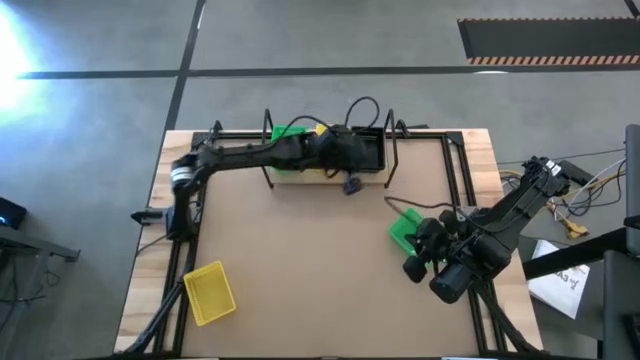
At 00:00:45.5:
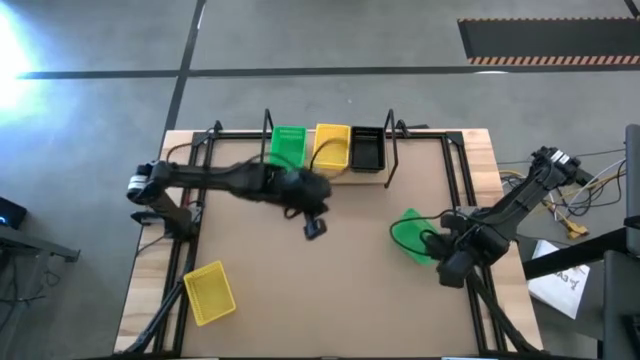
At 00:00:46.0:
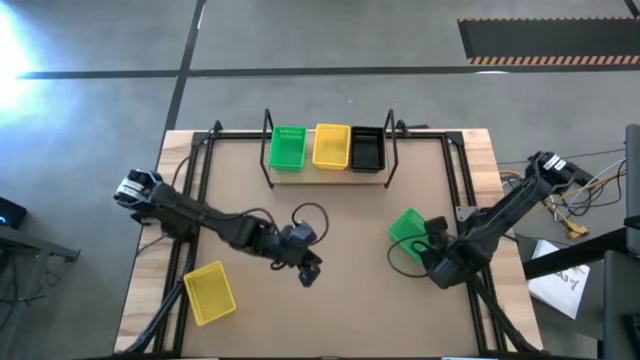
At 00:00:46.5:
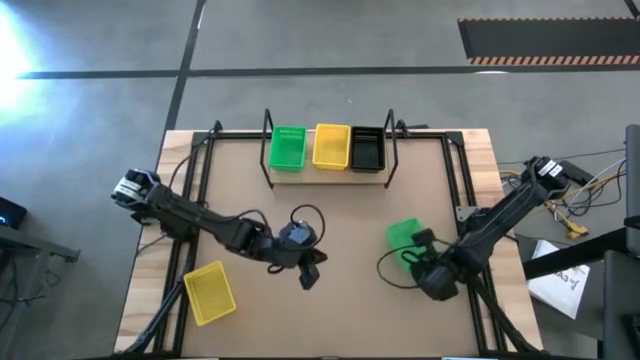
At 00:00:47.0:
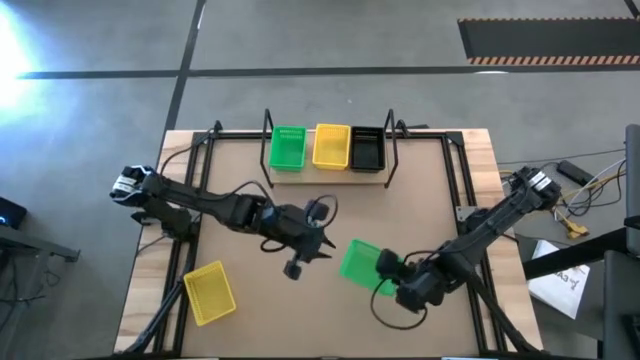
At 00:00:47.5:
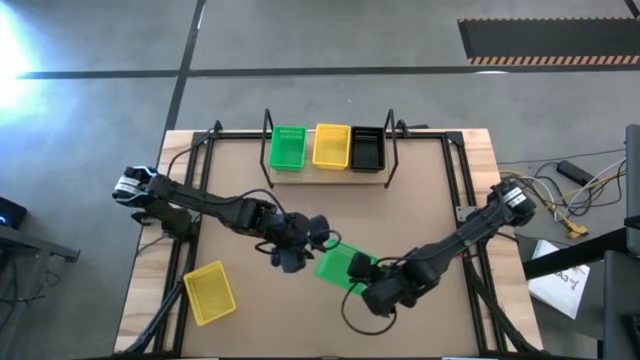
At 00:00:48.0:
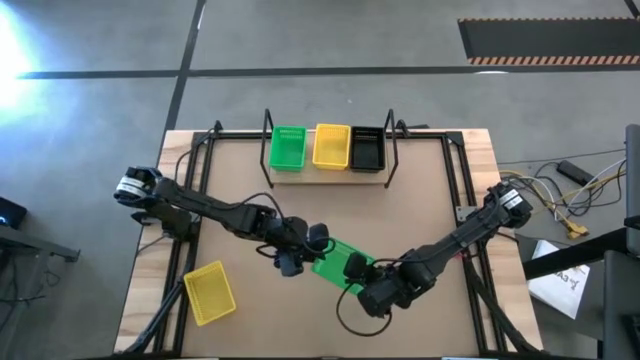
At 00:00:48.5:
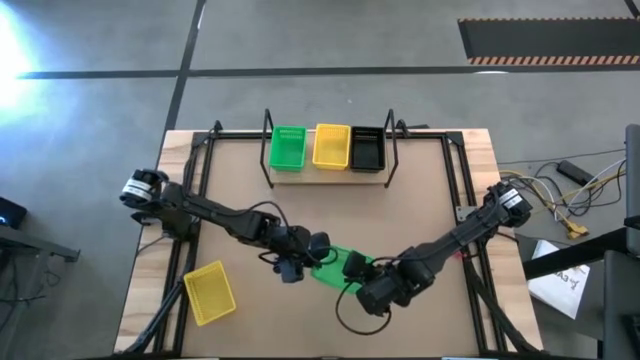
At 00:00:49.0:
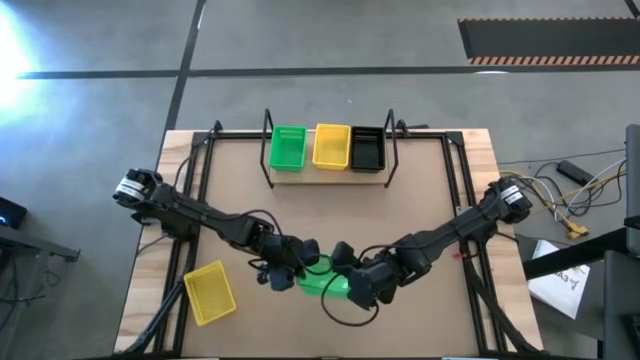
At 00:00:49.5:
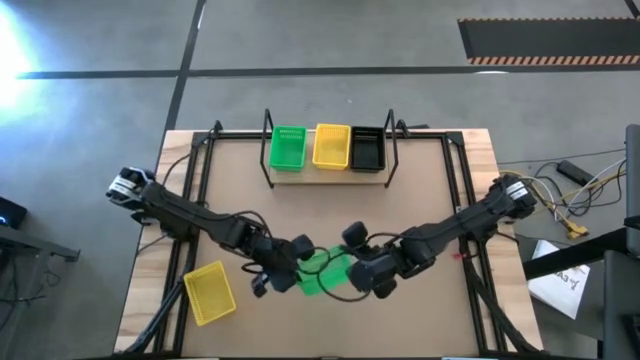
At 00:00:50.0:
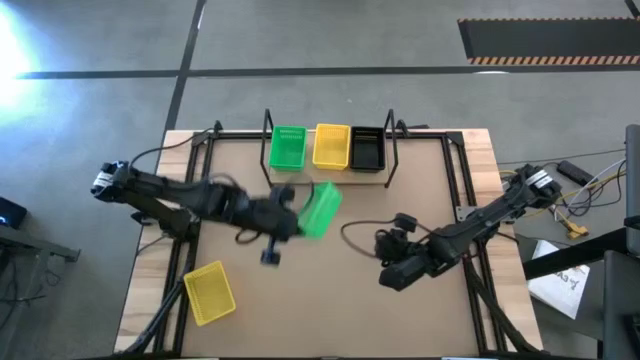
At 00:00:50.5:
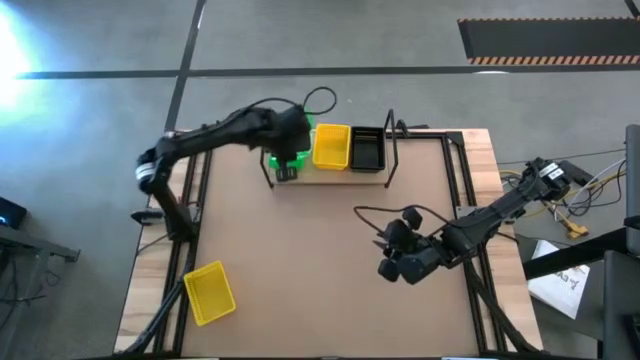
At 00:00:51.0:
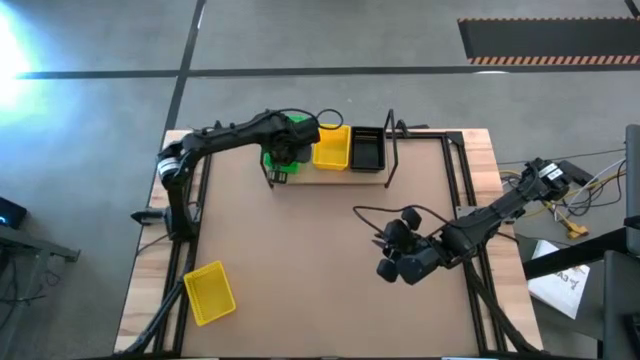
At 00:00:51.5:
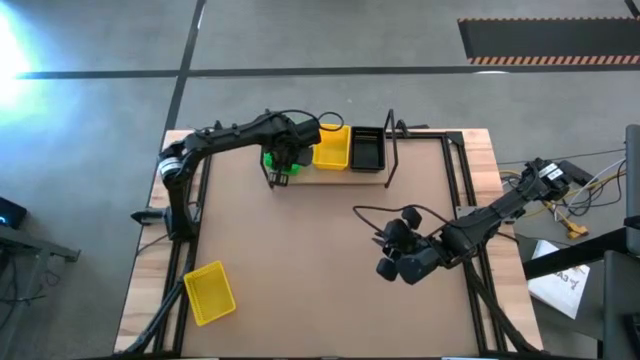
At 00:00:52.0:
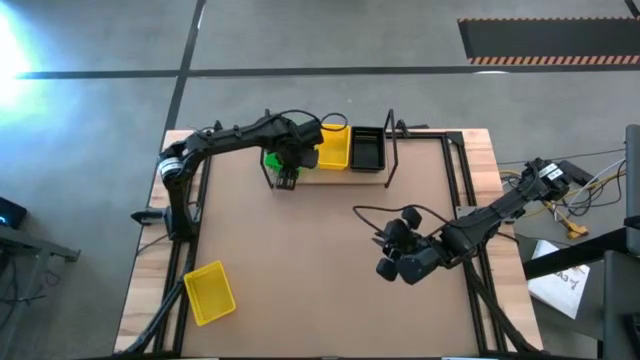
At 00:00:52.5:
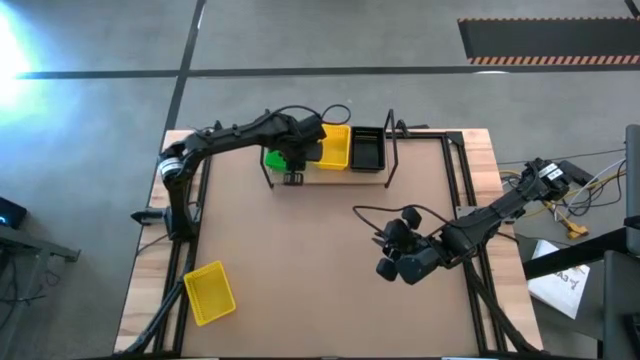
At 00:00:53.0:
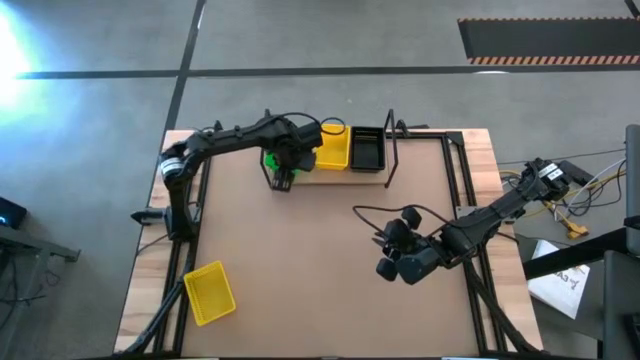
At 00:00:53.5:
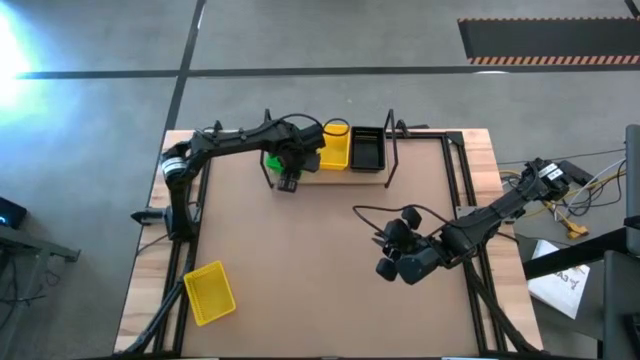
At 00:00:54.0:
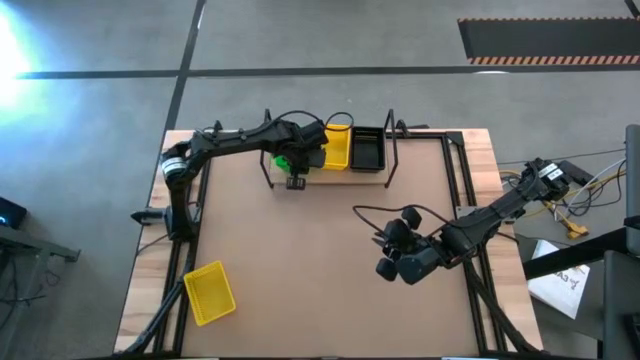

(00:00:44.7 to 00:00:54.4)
Task: Stack baskets on shelf by color
Stack the green bin on top of the other green bin on the shelf

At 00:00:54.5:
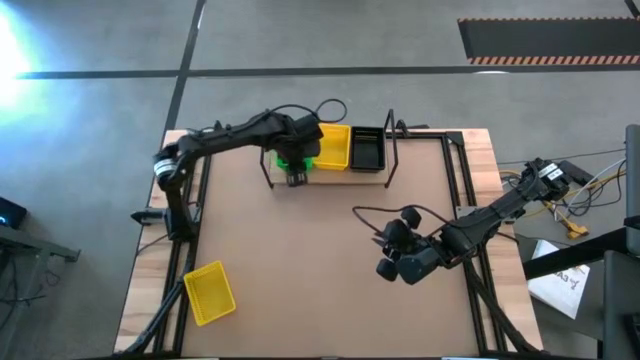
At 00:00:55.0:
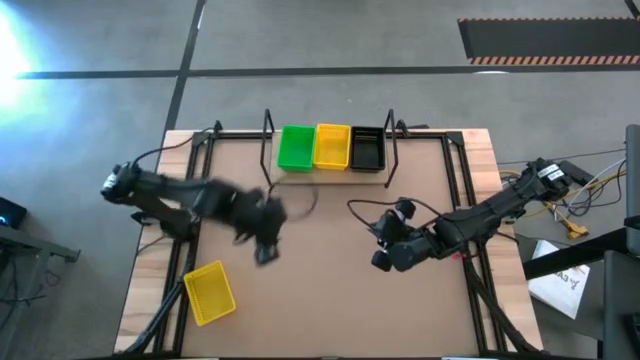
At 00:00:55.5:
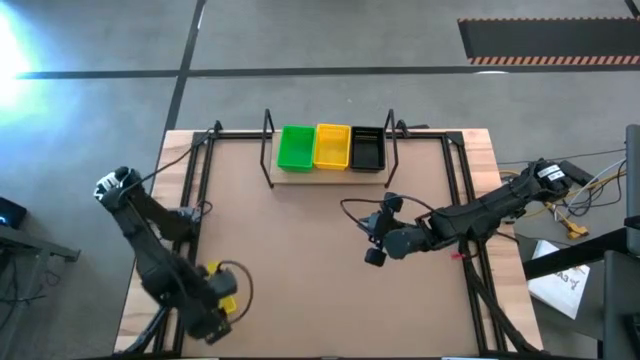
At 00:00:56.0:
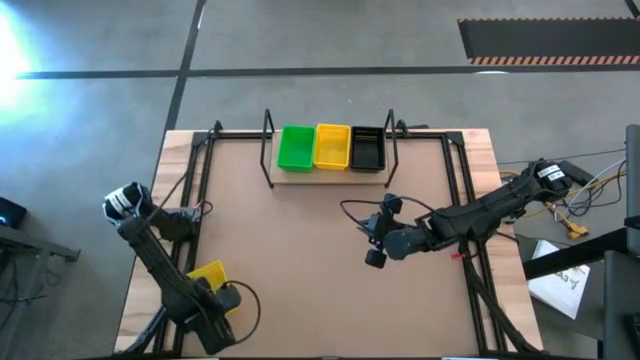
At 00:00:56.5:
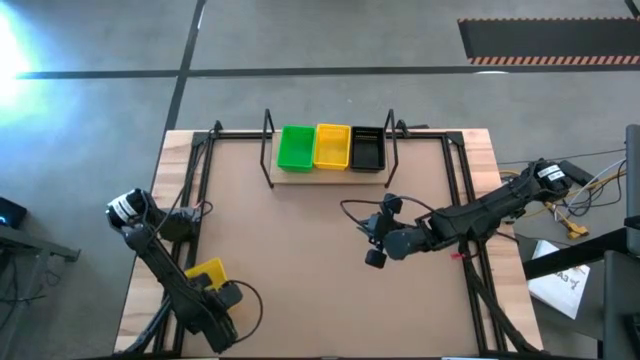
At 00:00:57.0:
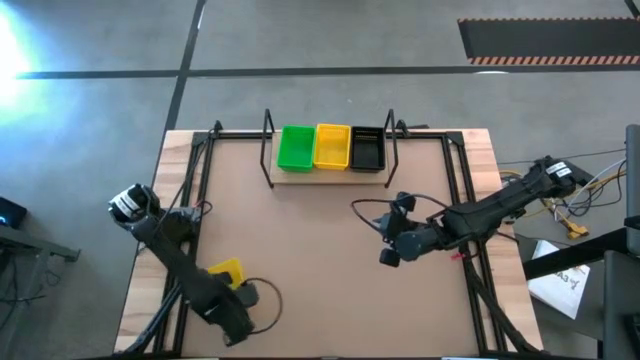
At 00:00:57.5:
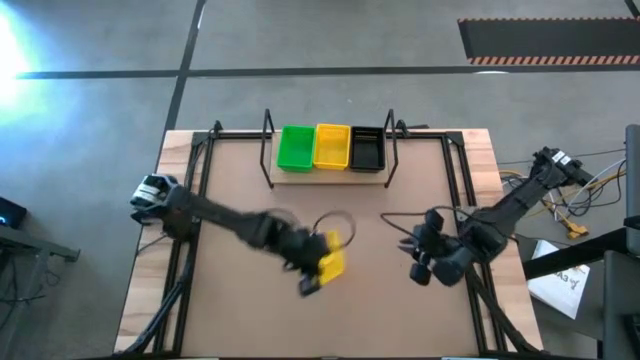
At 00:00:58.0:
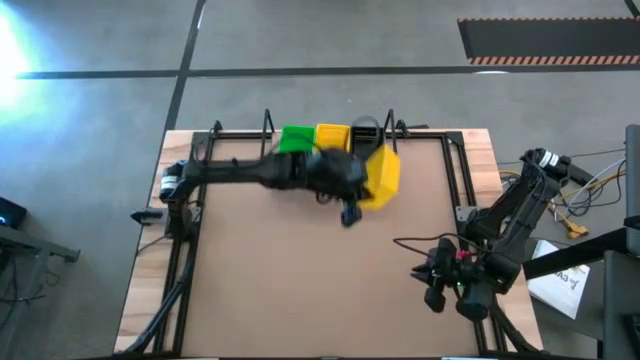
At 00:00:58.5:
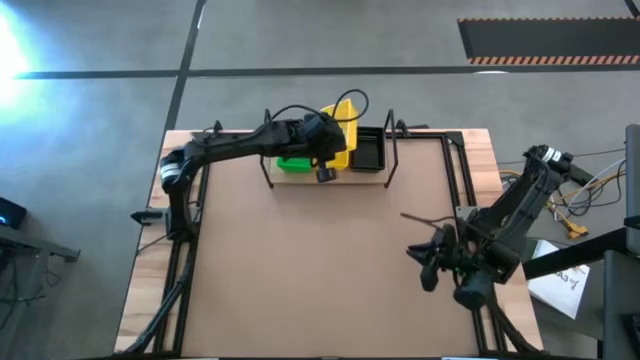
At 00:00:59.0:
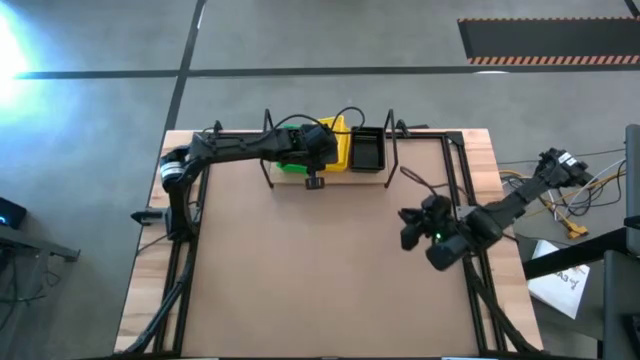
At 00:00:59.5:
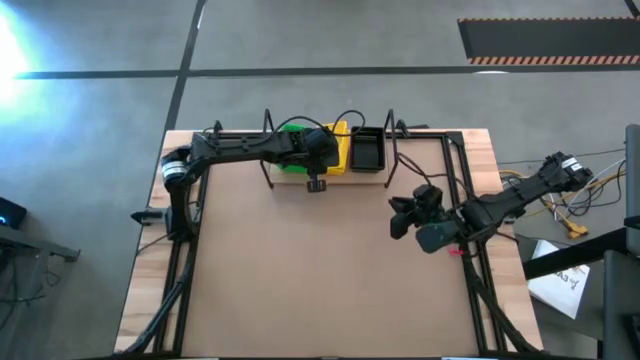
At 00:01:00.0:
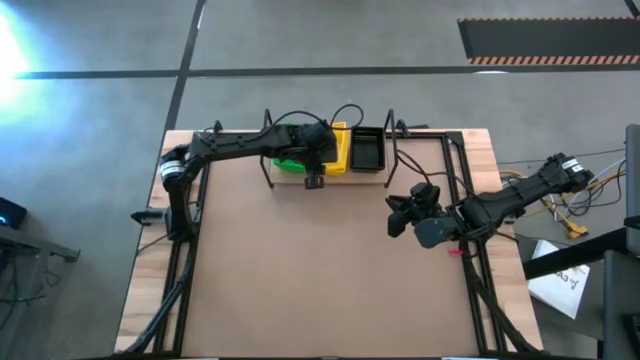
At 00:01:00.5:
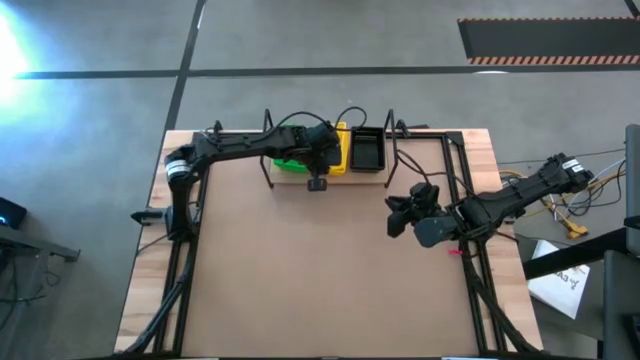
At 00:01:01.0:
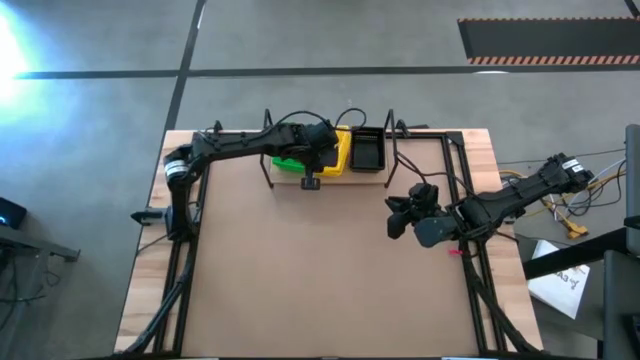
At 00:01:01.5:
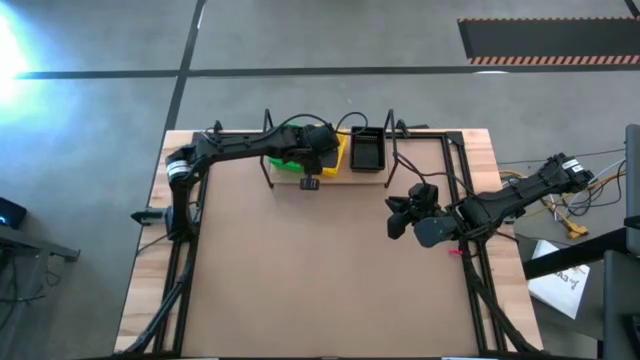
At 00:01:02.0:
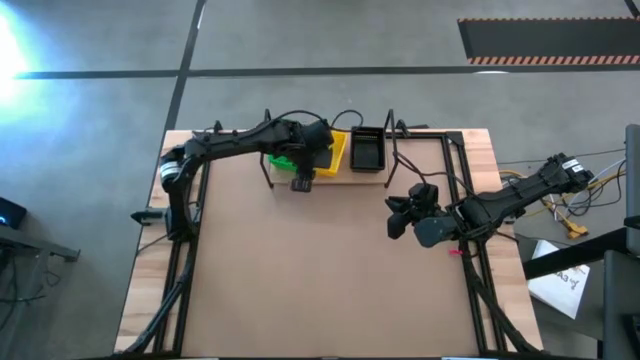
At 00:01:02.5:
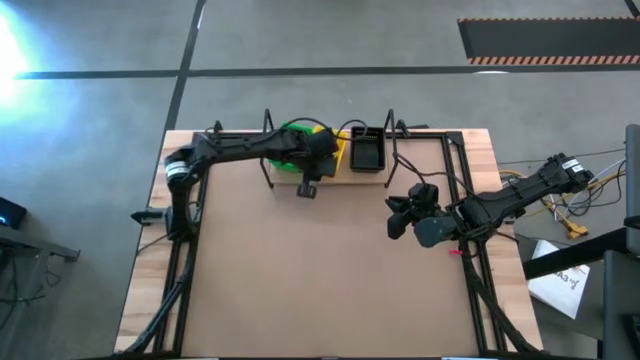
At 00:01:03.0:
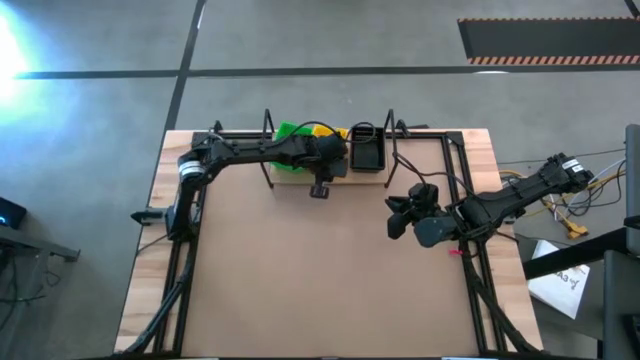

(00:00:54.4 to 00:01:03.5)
Stack the yellow bin on top of the other yellow bin on the shelf

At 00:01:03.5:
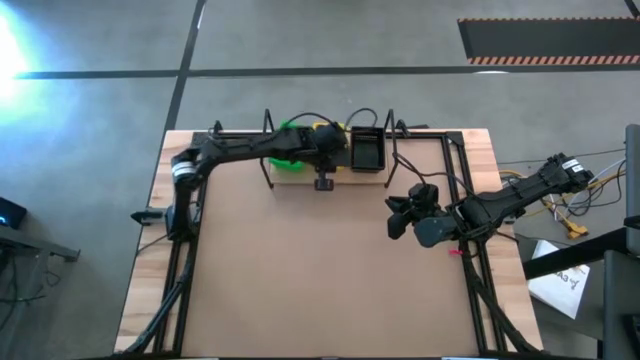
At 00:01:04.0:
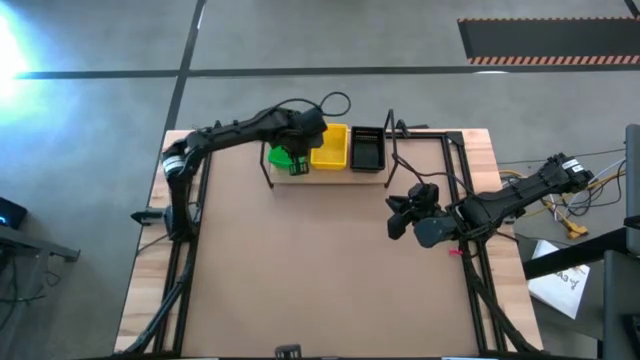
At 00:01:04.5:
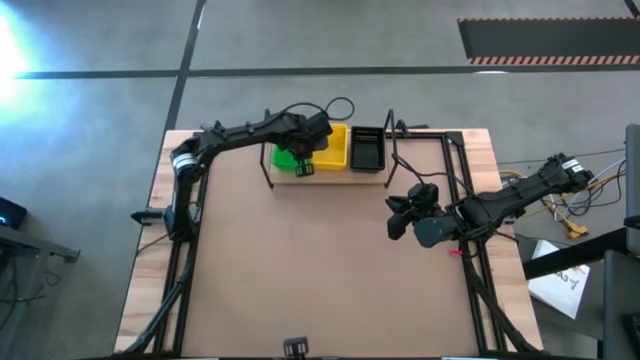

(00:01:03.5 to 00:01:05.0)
Adjust the green bins on the shelf

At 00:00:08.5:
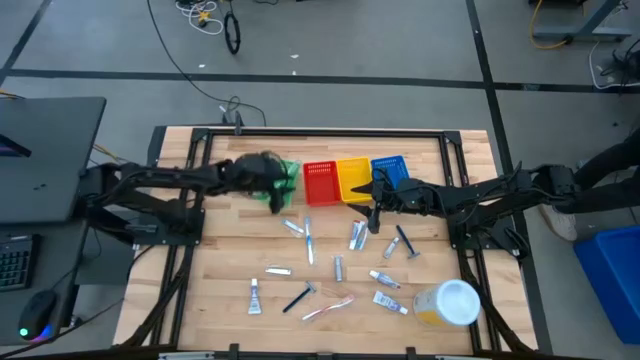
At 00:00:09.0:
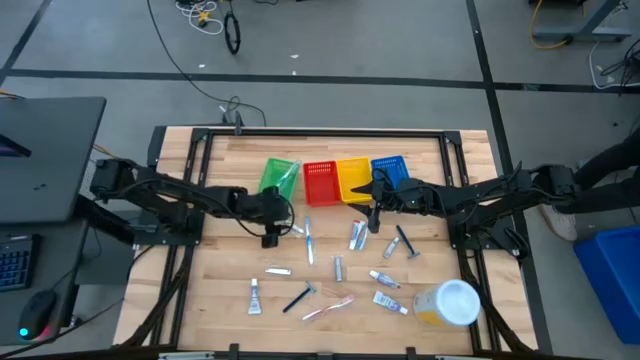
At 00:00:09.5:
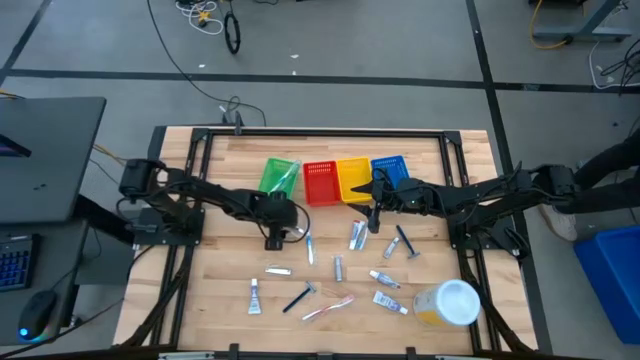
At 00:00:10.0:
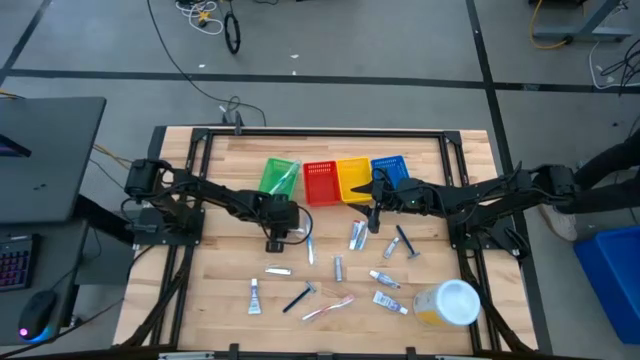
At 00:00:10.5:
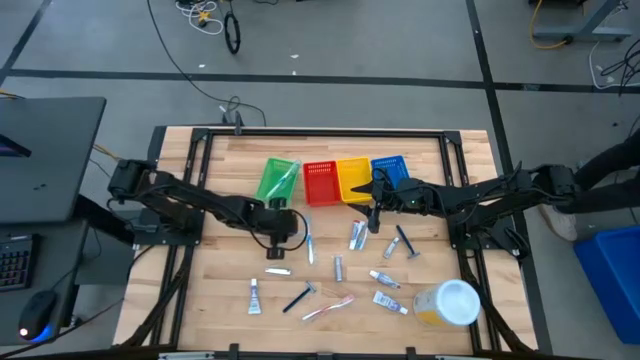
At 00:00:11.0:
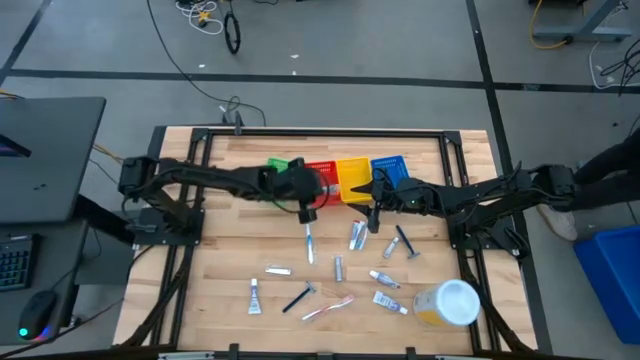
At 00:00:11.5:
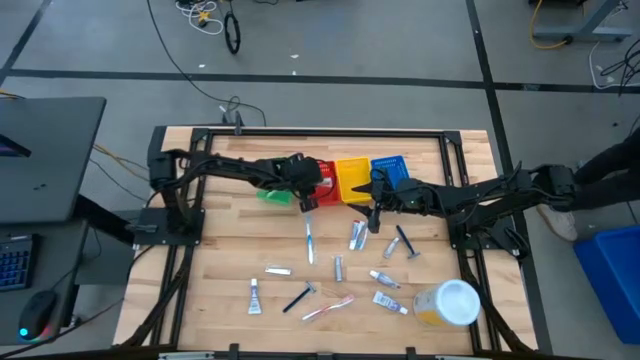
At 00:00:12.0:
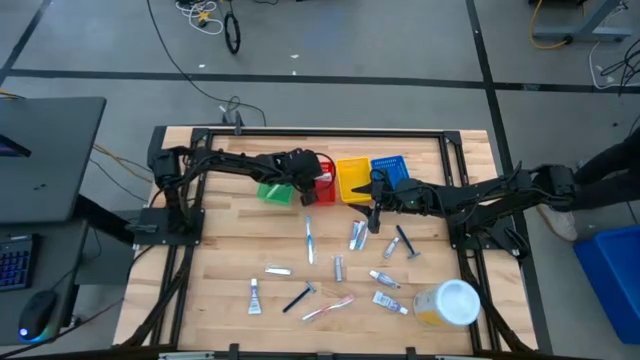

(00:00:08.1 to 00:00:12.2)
Task: Pick & Place Travel size toiletries
Put the silver nail cutter into the red bin
